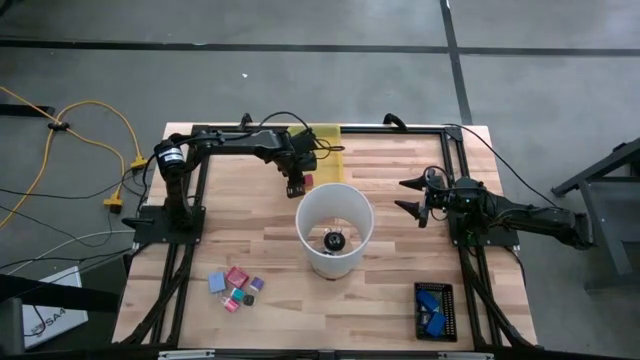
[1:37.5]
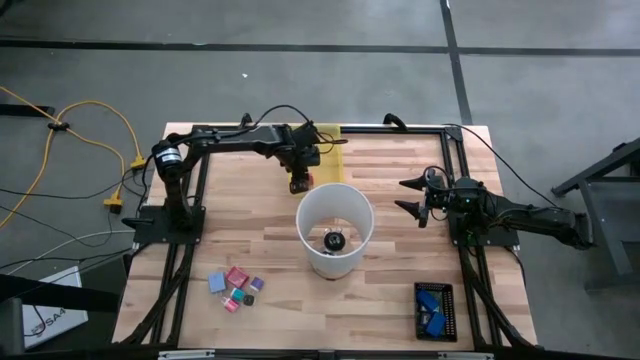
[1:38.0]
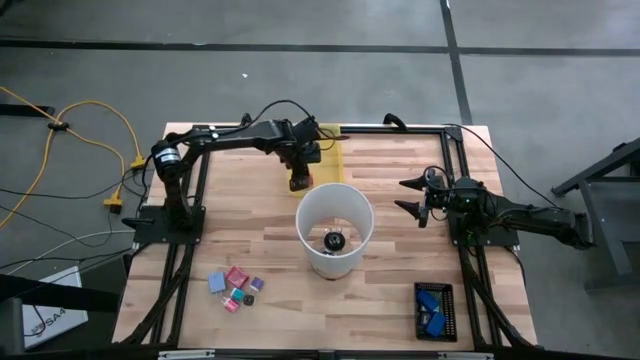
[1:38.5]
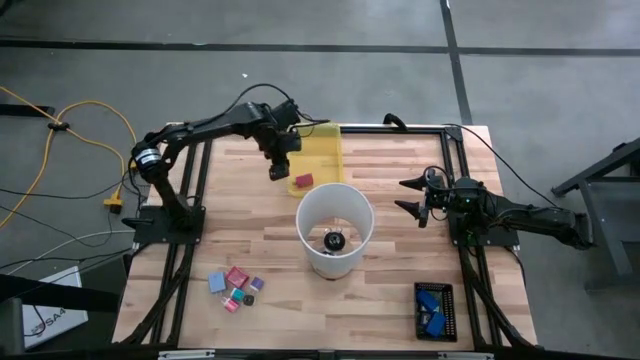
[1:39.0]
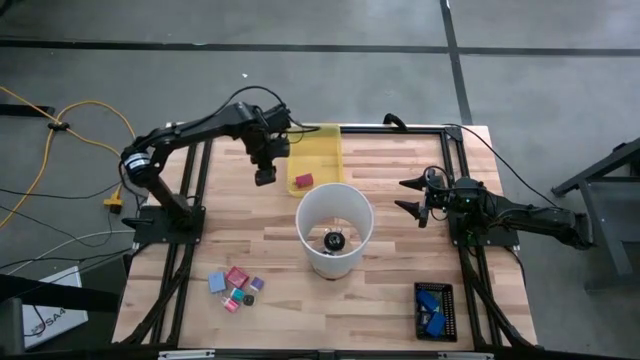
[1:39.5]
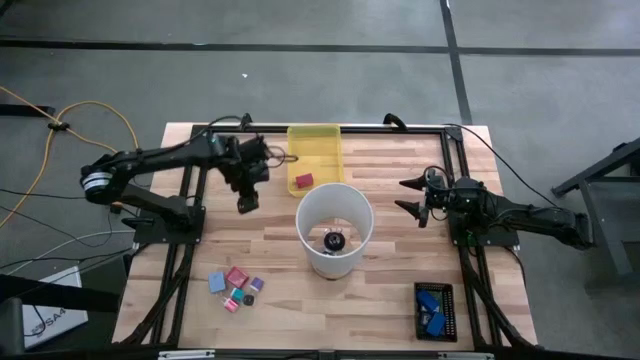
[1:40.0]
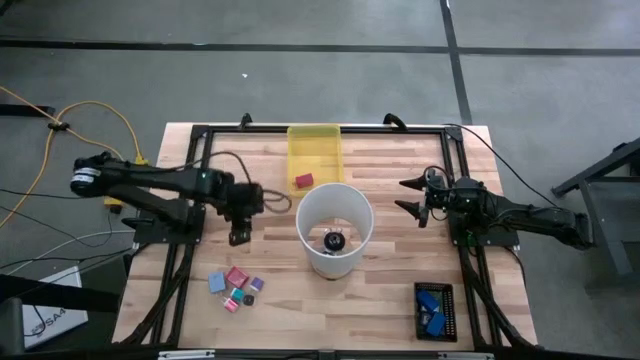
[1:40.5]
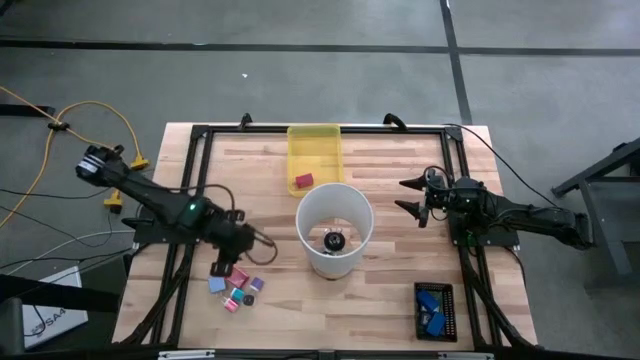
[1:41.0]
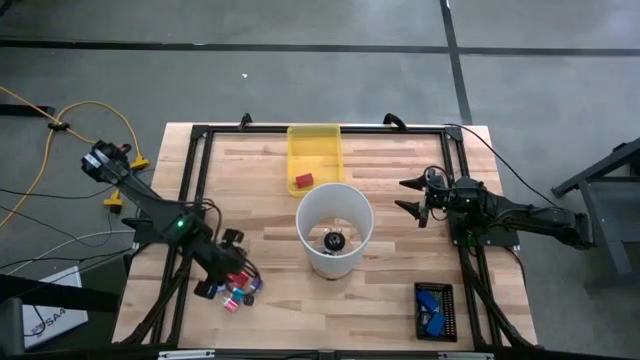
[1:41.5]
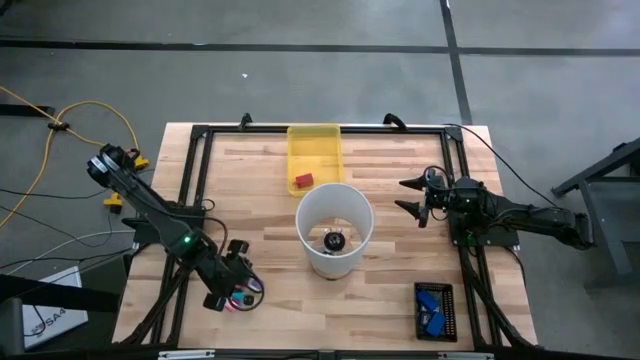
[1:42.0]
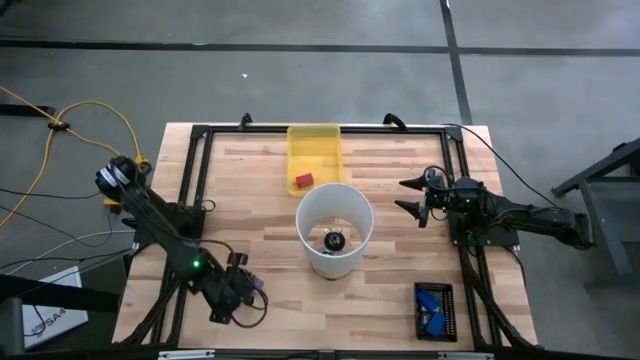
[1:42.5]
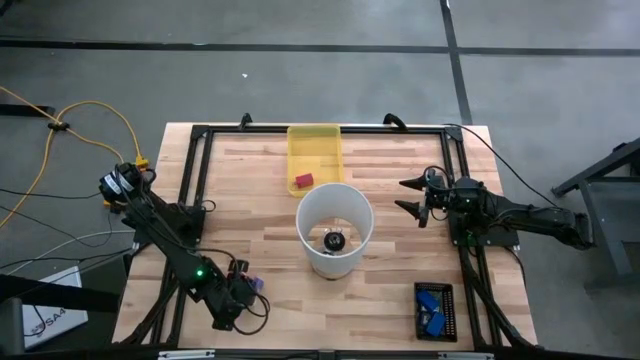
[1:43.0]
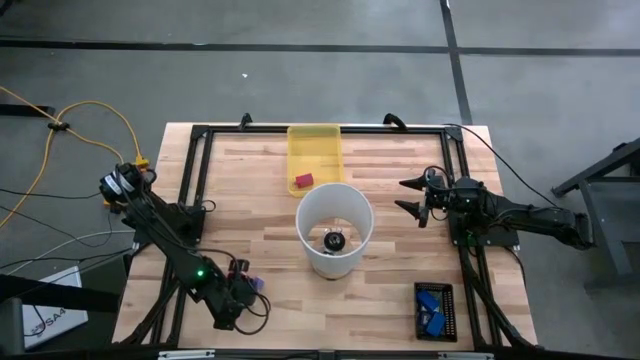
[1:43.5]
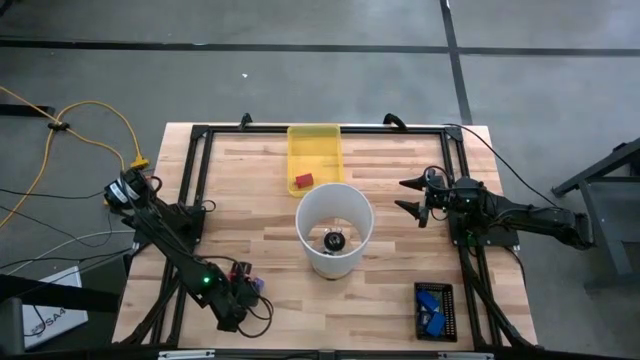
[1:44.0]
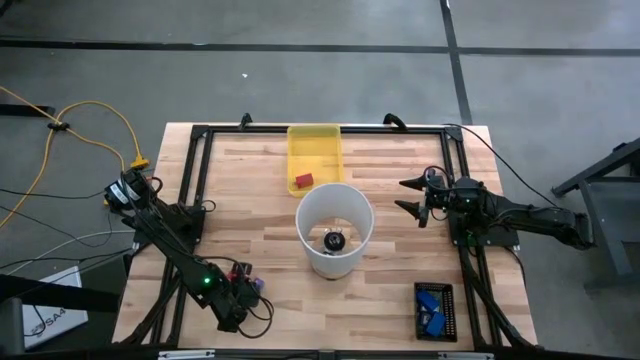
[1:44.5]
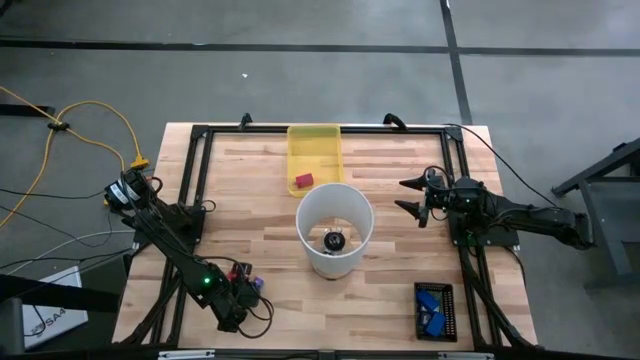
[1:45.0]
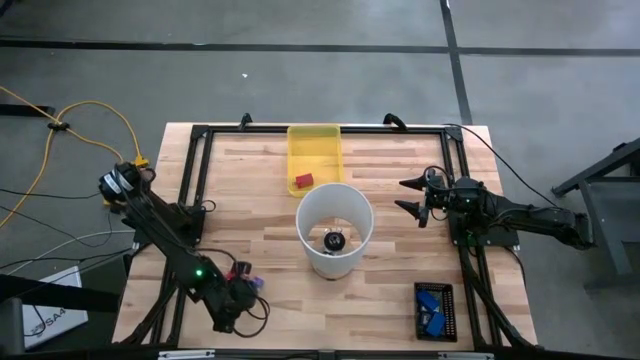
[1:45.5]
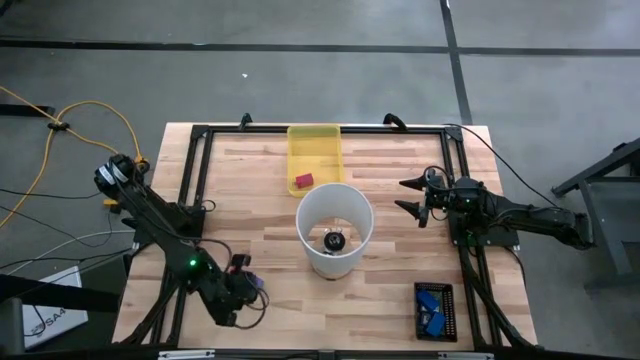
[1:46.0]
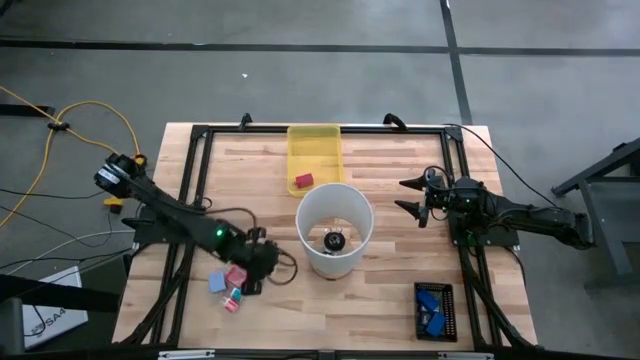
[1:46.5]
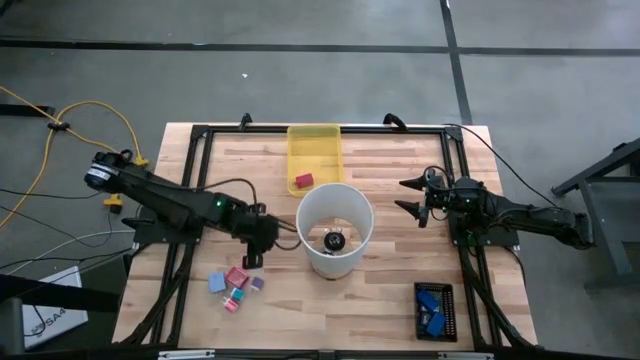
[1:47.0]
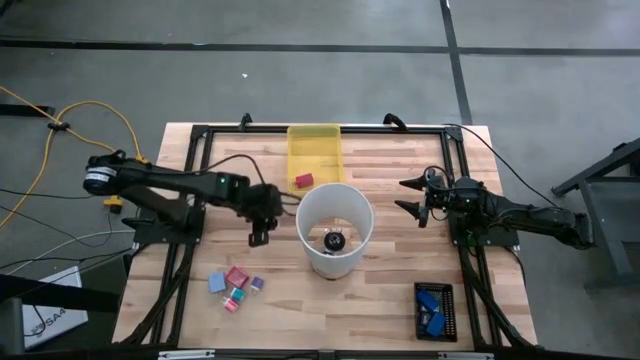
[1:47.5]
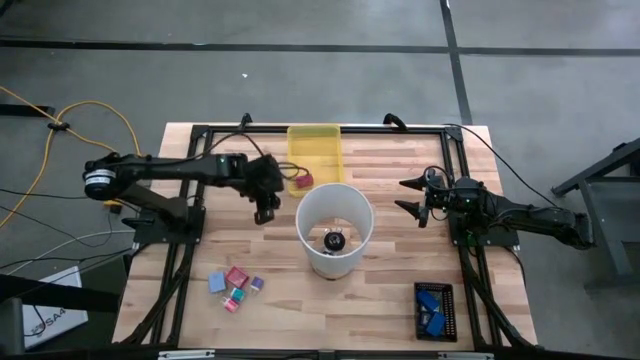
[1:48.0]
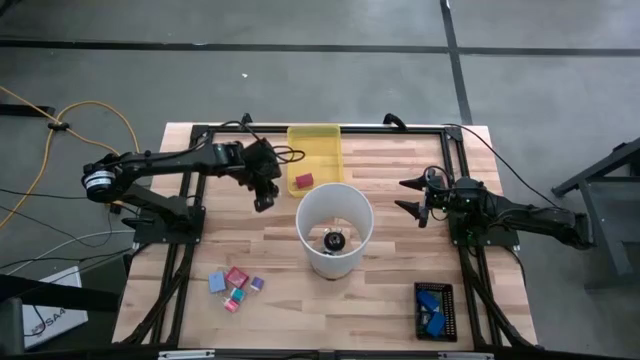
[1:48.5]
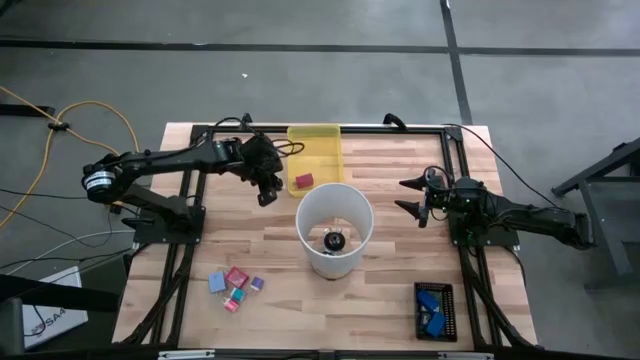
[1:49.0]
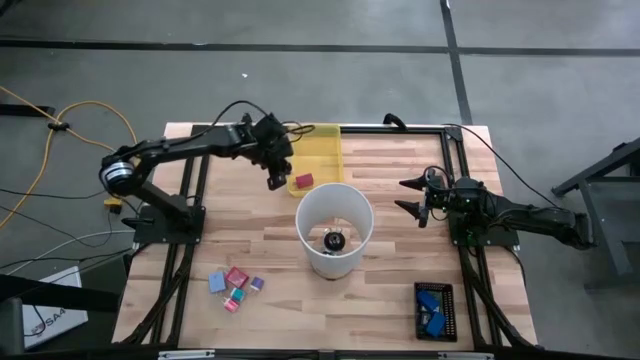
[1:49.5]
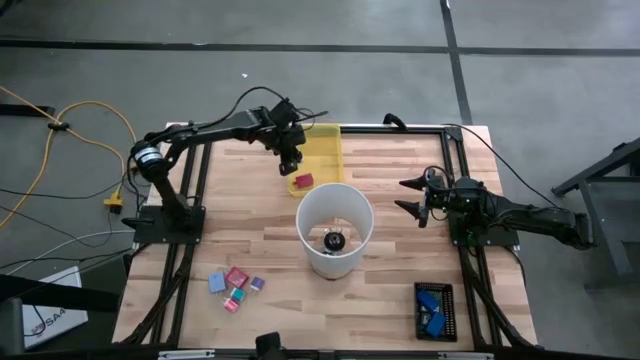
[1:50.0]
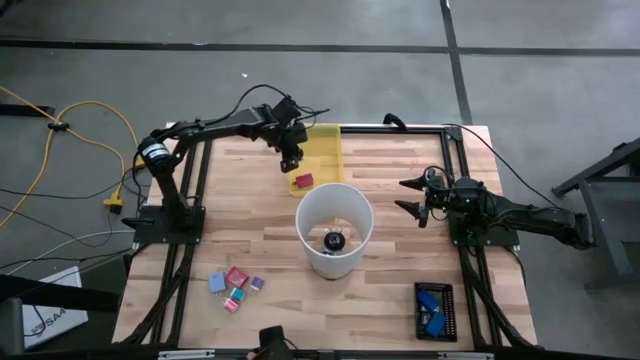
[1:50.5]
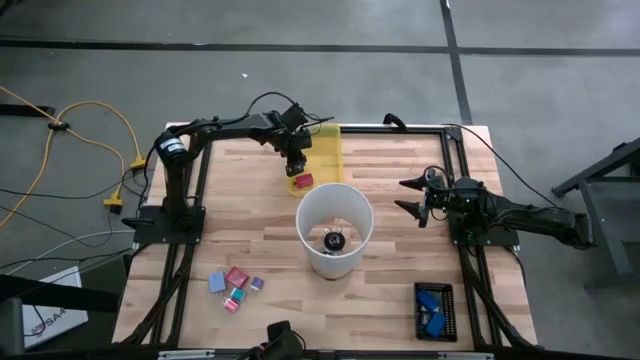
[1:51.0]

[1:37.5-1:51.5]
Task: Pick & Place Office items
Put the white charger adapter into the yellow bin
